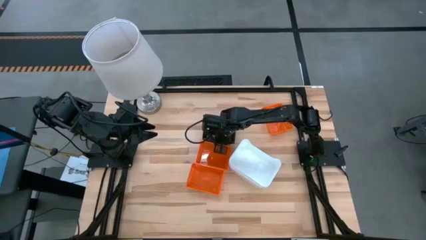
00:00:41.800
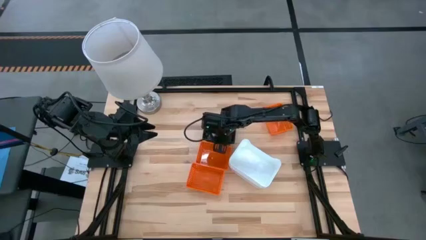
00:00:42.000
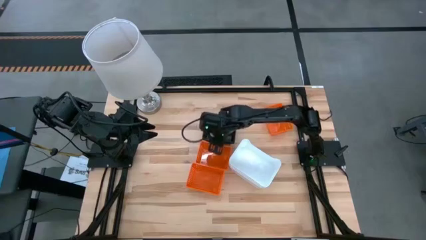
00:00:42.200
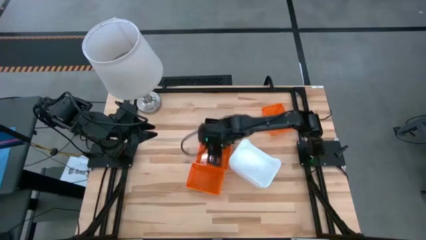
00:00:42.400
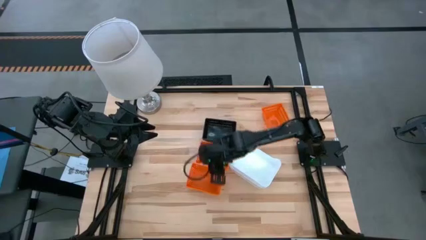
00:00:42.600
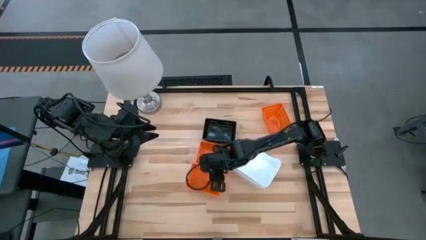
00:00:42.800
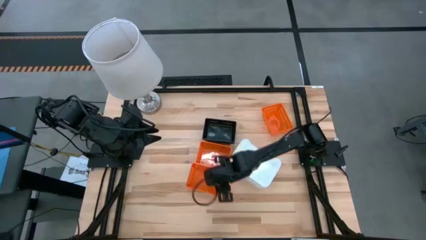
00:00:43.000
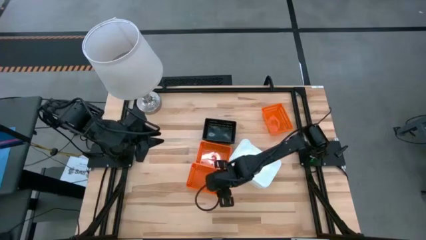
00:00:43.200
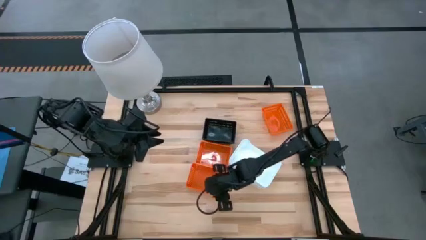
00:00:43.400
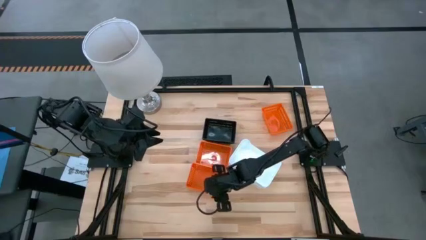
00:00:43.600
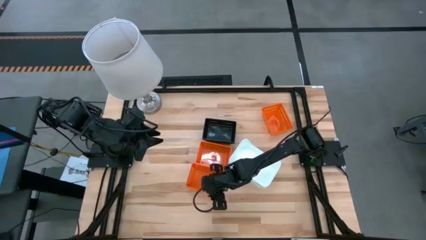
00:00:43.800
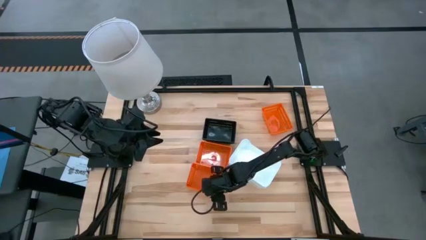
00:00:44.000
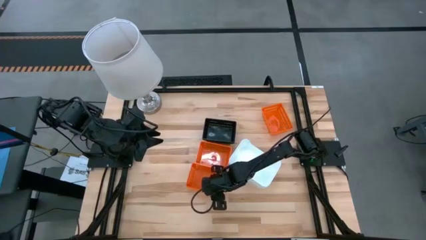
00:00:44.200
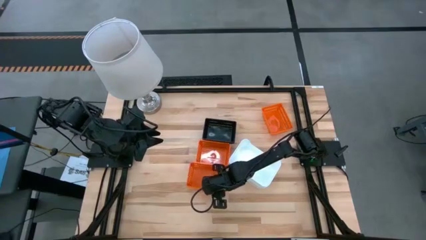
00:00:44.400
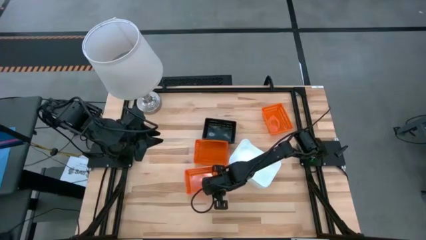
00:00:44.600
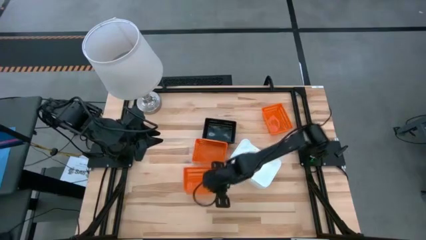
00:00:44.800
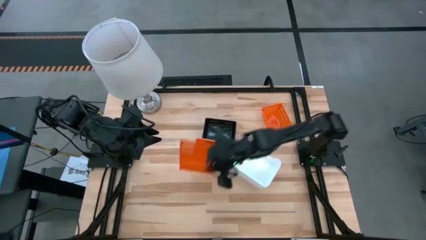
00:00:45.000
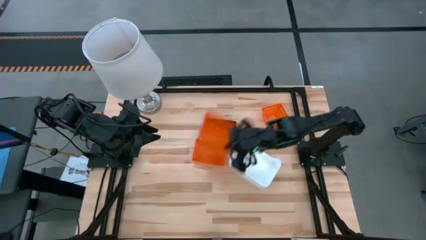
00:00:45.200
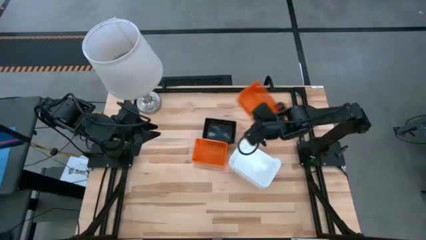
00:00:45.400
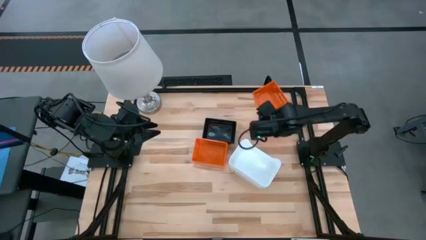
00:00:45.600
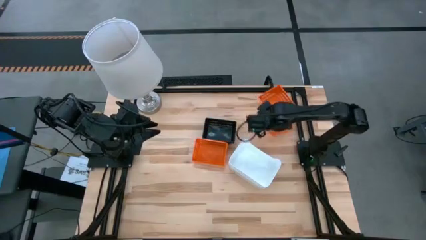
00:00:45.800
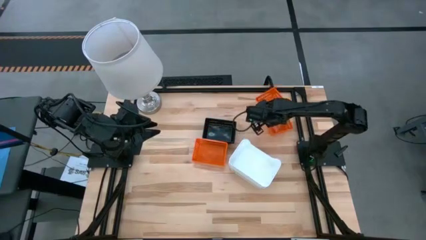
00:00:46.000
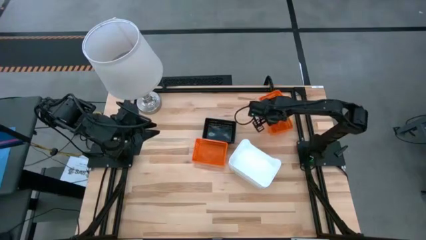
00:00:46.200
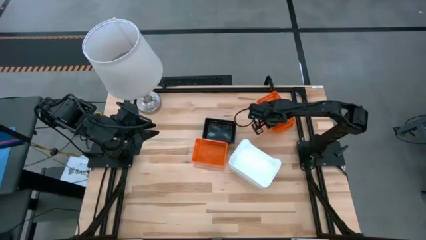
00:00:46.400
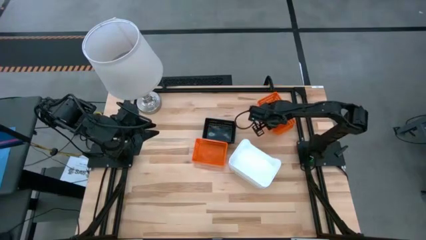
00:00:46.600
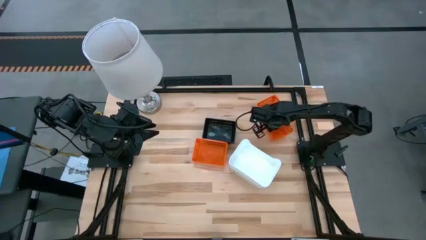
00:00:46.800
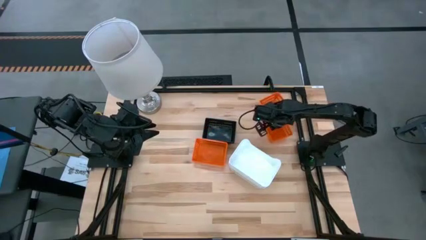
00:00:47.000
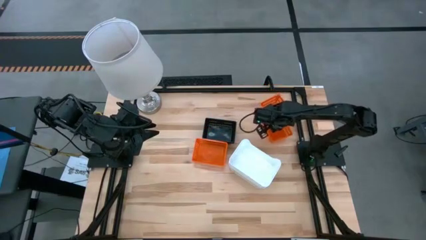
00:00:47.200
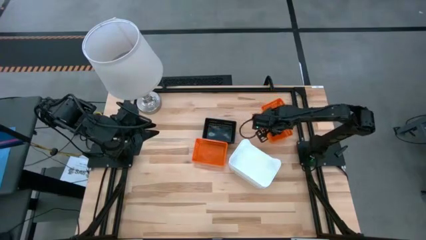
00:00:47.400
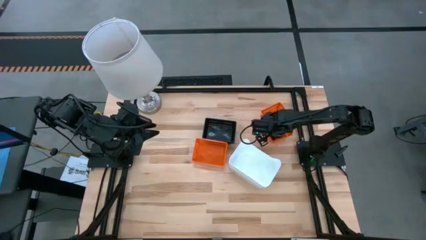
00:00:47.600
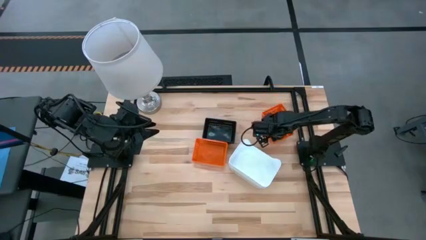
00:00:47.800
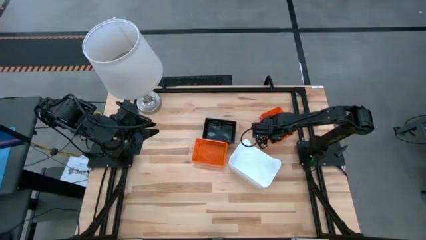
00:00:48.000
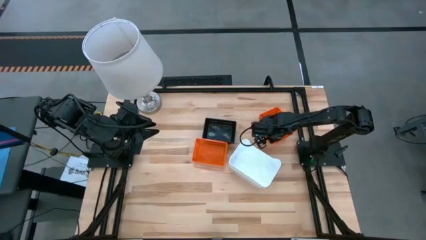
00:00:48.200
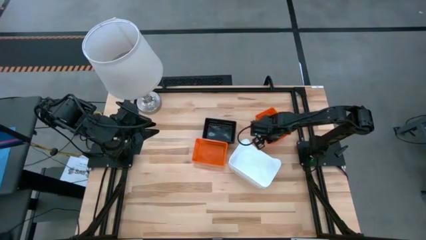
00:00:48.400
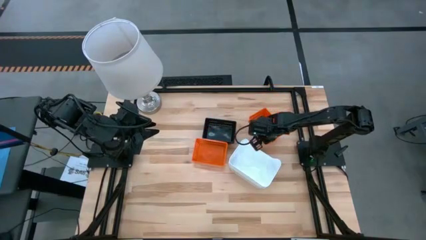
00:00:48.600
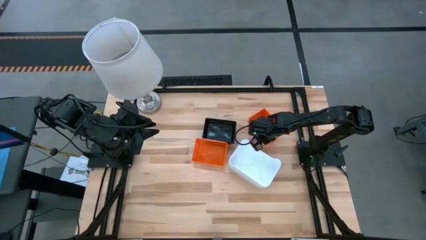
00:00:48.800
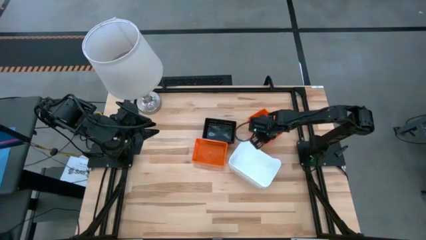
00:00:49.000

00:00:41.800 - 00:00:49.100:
Stack the bottom orange bin on top of the top orange bin

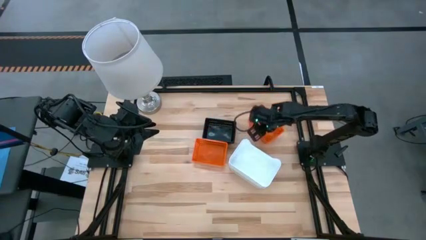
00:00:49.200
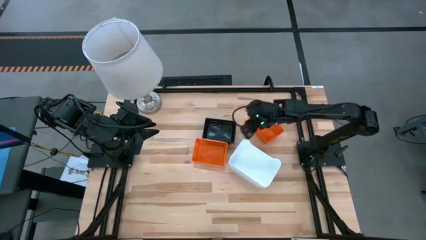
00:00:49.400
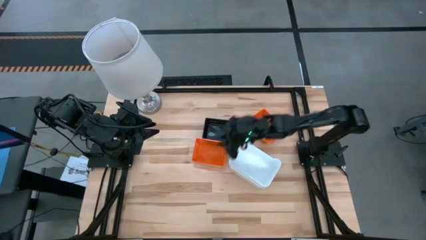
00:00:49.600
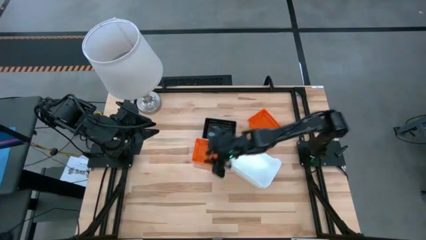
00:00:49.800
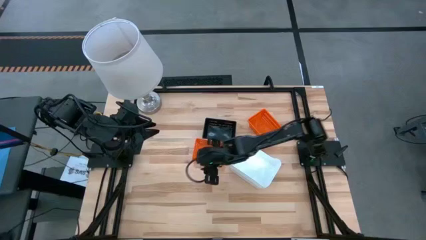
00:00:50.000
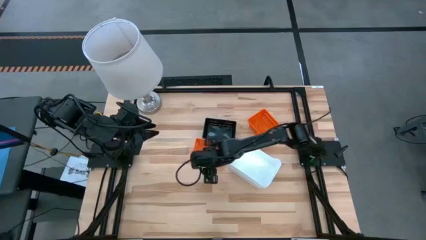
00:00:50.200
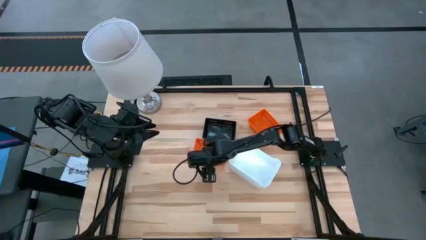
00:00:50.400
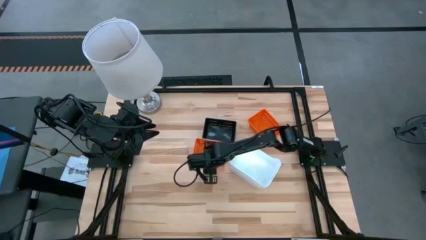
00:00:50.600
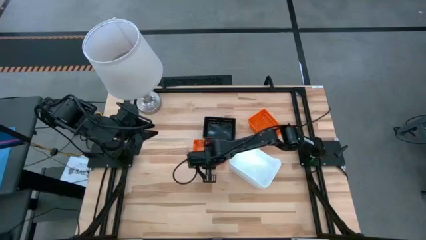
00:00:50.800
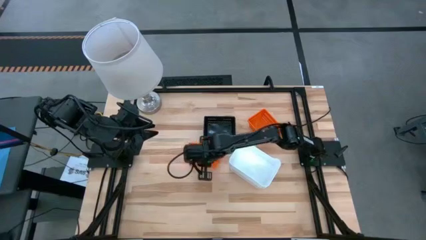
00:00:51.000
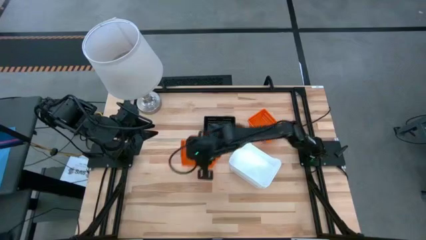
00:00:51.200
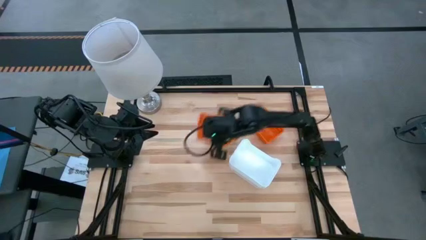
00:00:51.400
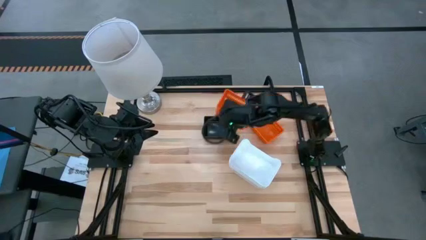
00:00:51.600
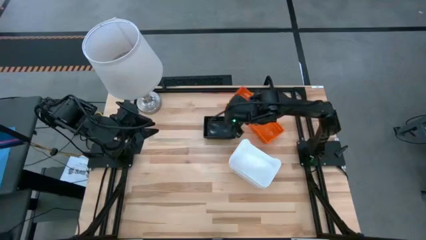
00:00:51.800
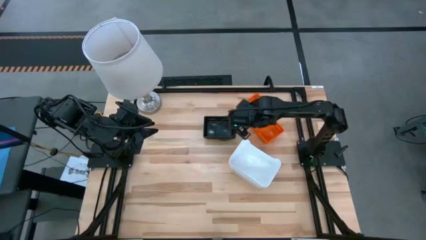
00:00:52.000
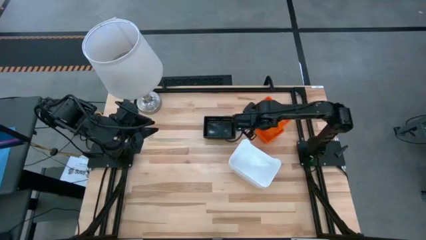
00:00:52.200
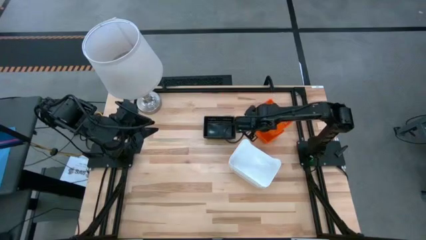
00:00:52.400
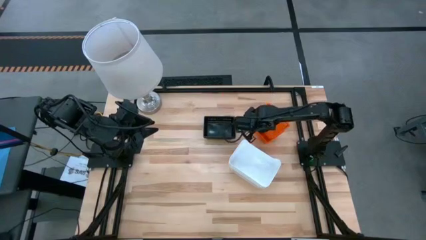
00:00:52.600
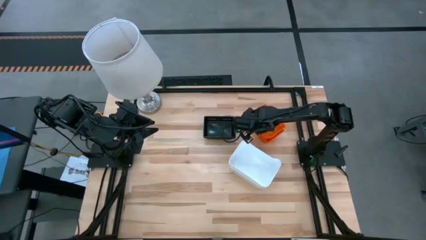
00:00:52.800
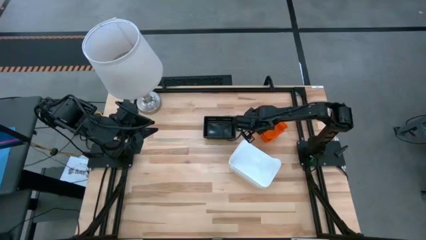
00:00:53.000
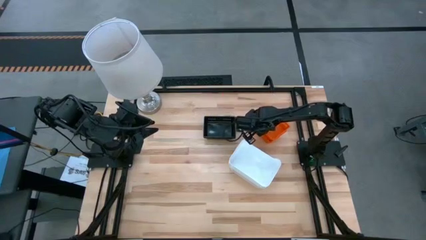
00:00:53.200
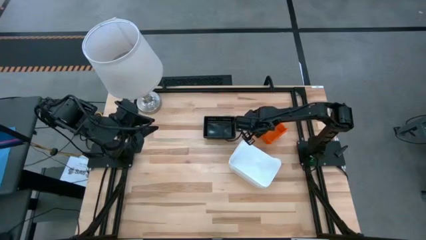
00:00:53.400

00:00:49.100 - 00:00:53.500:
Stack the bottom orange bin on top of the right orange bin
